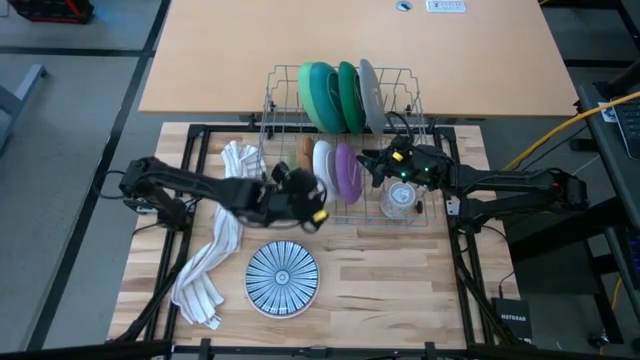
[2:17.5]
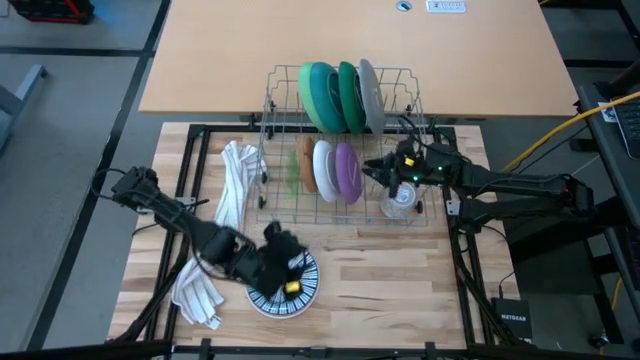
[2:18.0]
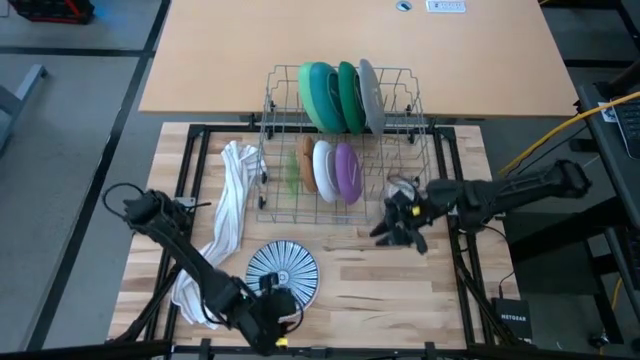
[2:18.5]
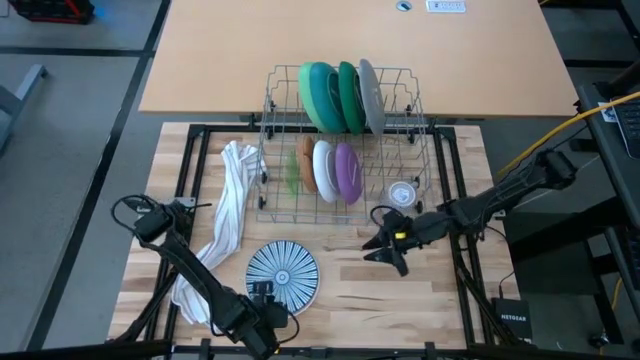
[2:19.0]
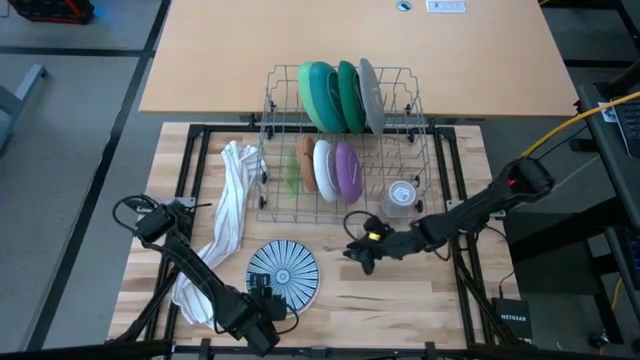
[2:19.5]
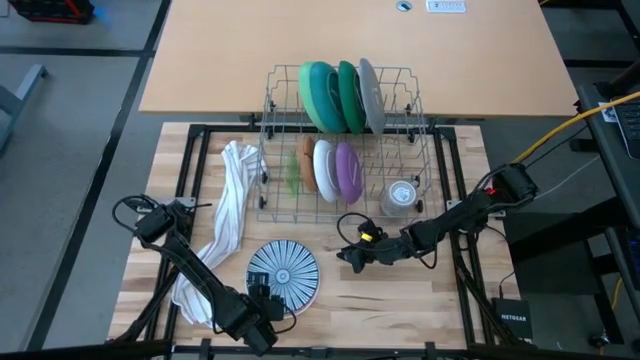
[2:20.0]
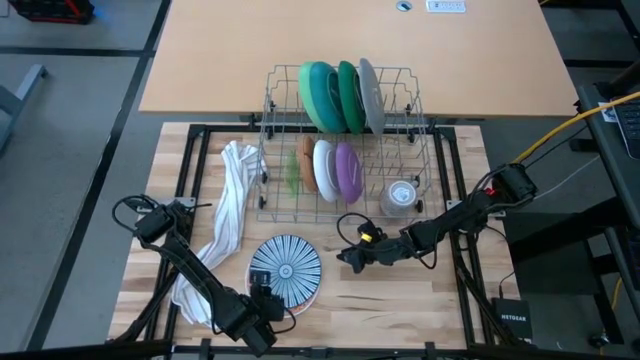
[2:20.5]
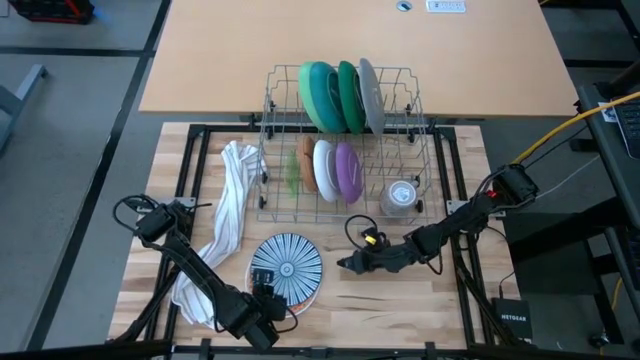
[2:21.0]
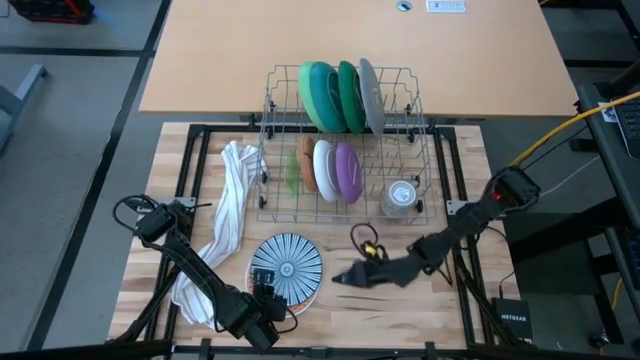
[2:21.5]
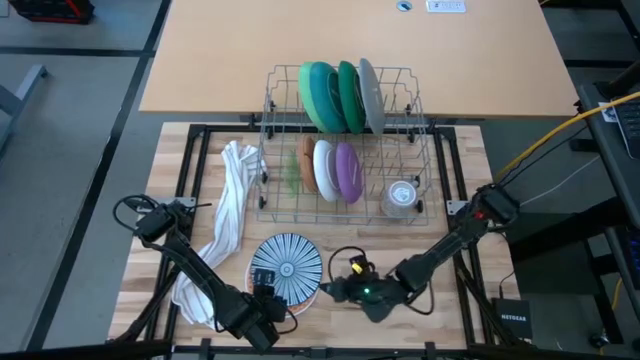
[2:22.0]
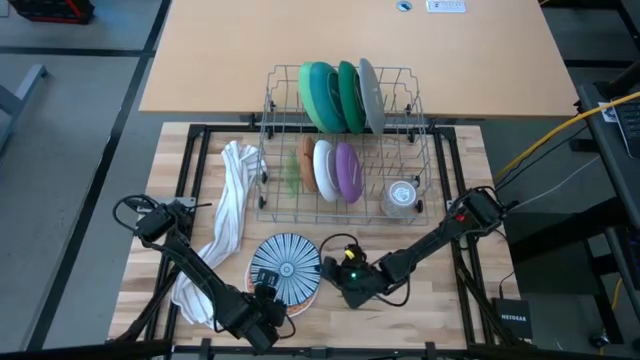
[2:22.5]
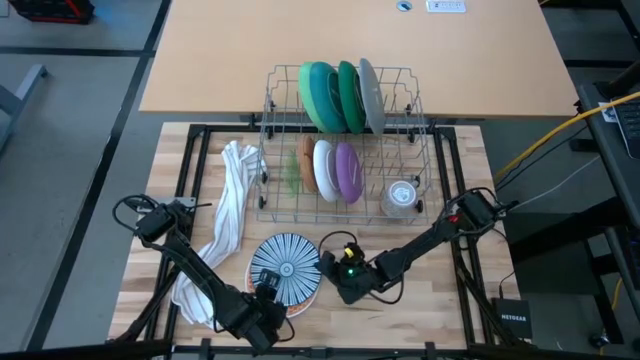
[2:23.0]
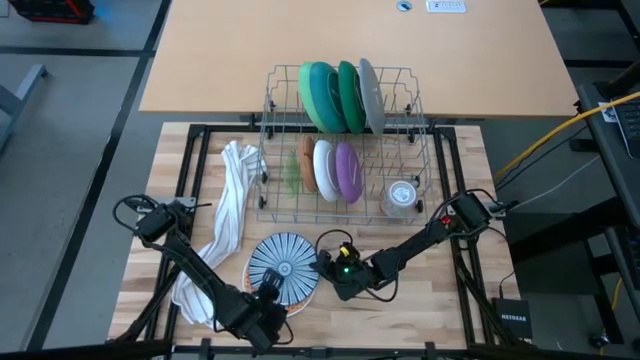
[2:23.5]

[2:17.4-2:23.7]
Task: Sort dishes
Put the blue patterned plate into the dish rack

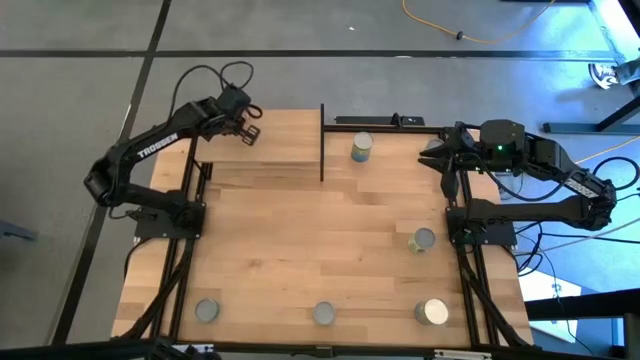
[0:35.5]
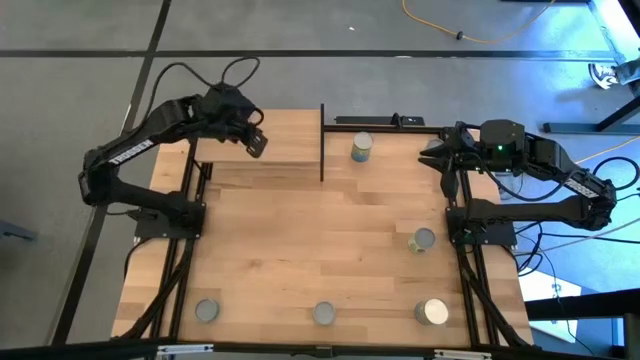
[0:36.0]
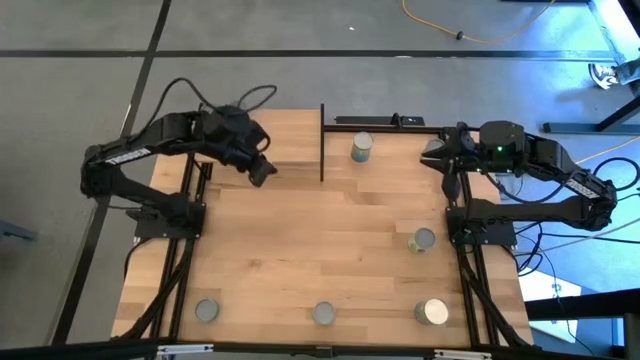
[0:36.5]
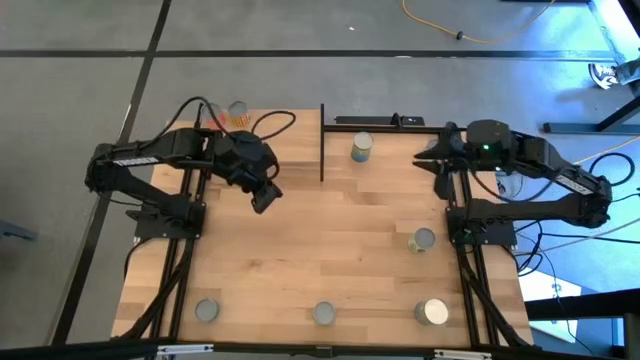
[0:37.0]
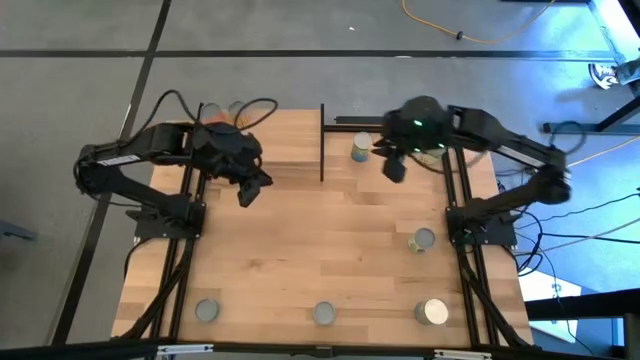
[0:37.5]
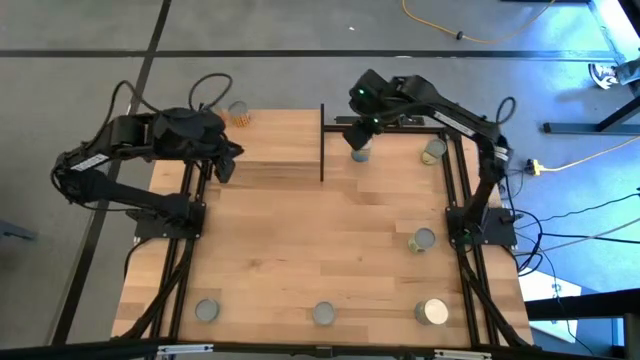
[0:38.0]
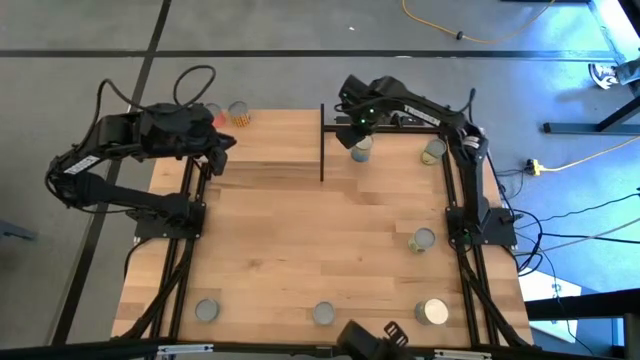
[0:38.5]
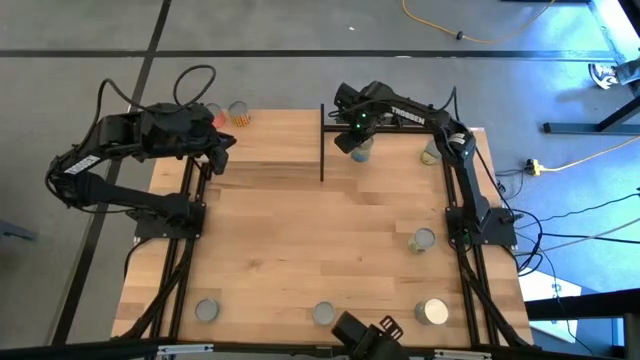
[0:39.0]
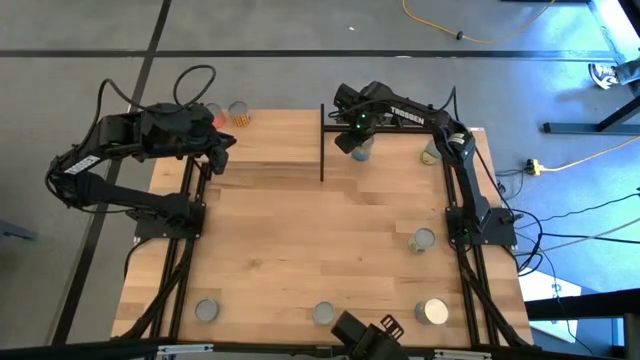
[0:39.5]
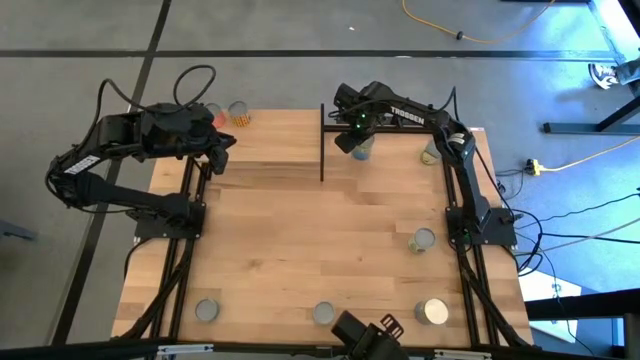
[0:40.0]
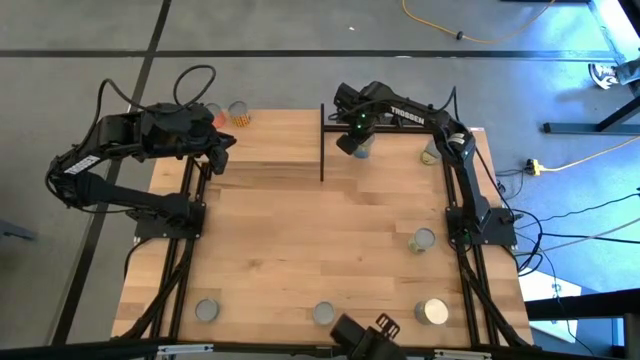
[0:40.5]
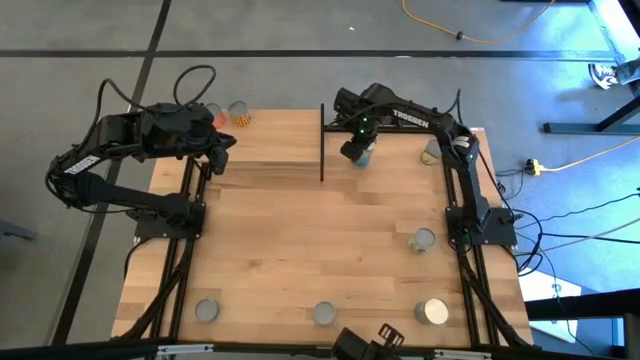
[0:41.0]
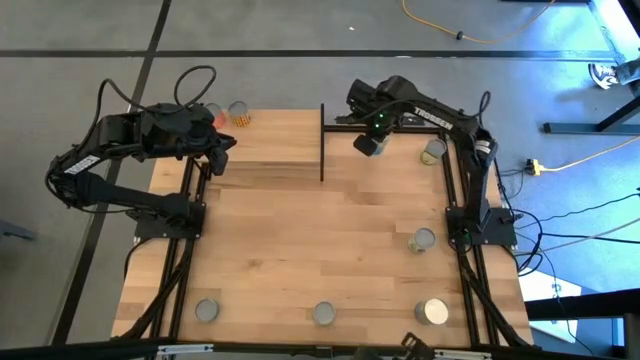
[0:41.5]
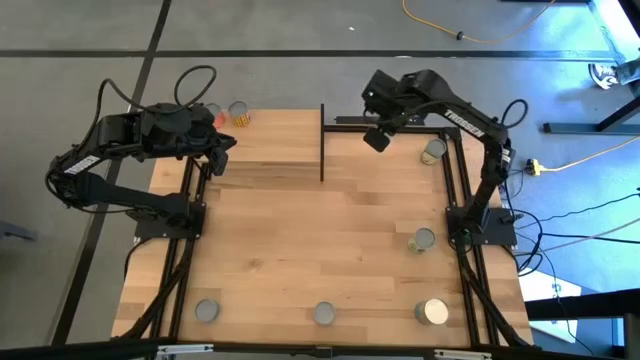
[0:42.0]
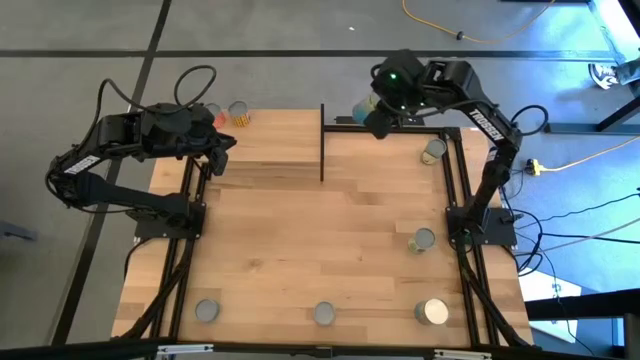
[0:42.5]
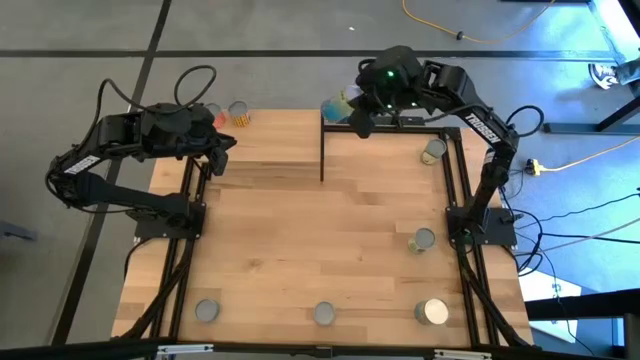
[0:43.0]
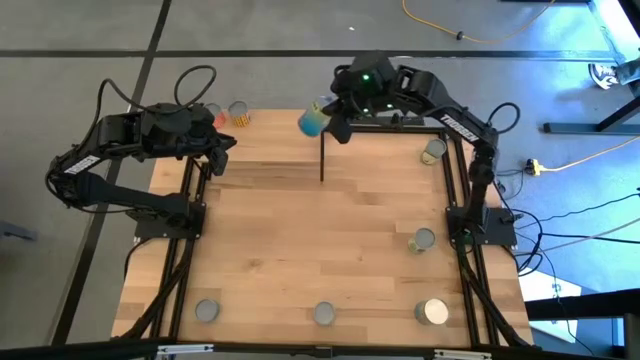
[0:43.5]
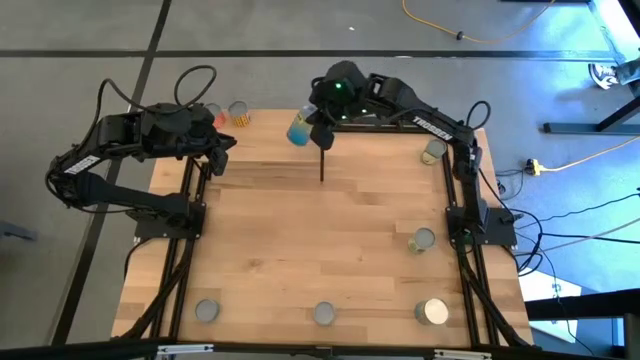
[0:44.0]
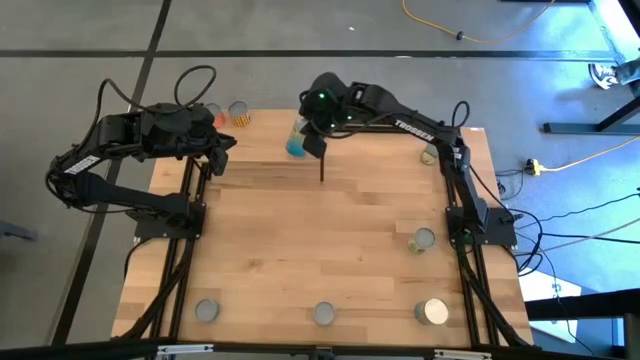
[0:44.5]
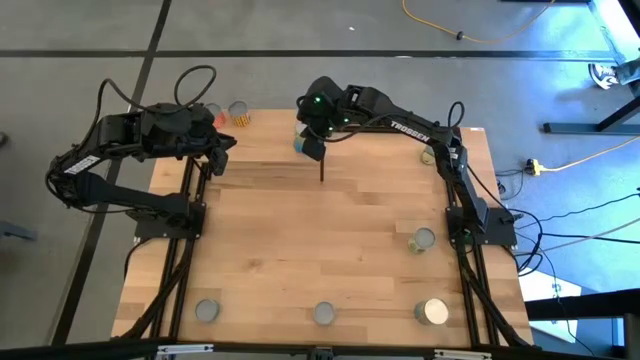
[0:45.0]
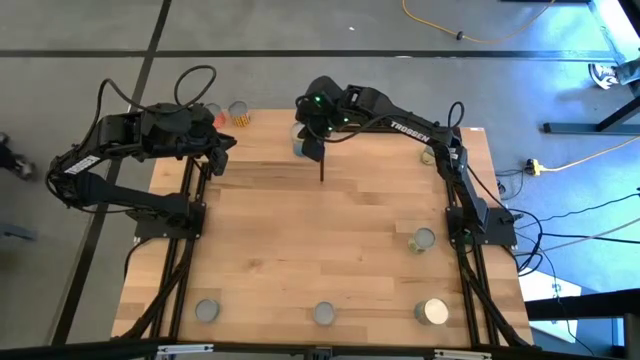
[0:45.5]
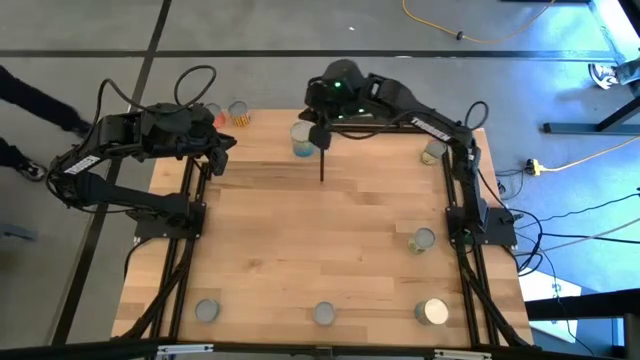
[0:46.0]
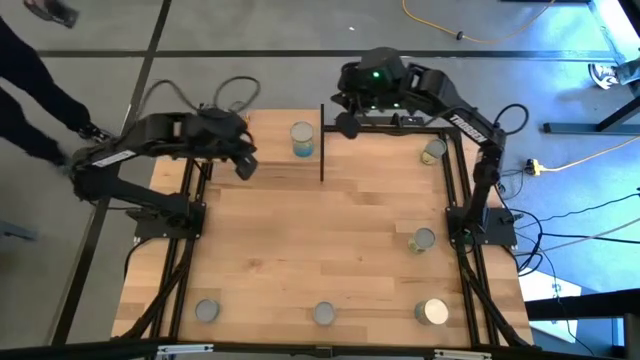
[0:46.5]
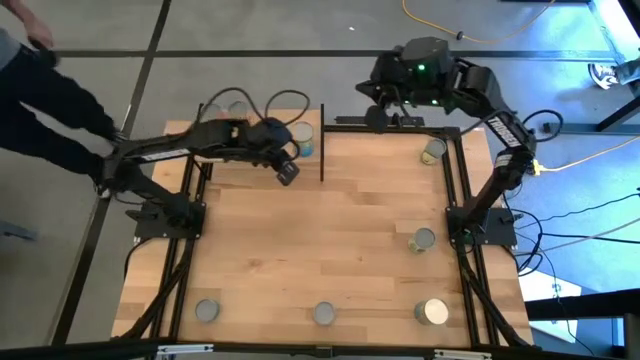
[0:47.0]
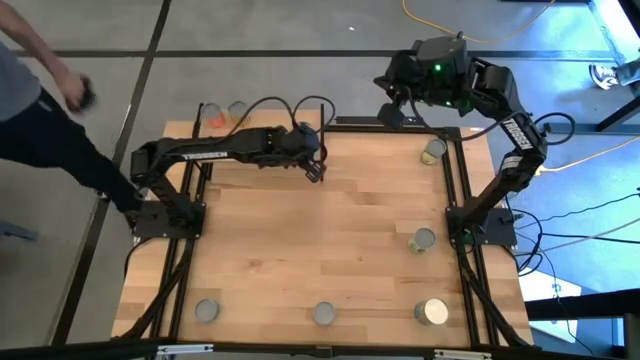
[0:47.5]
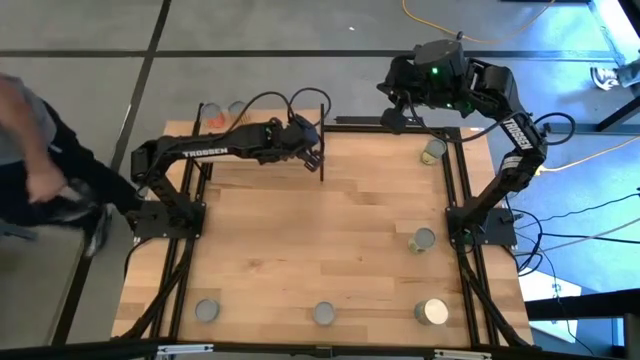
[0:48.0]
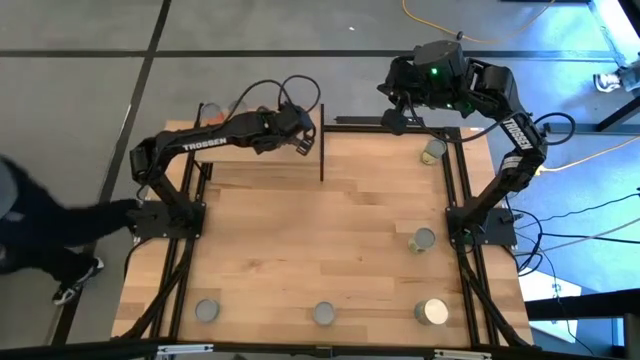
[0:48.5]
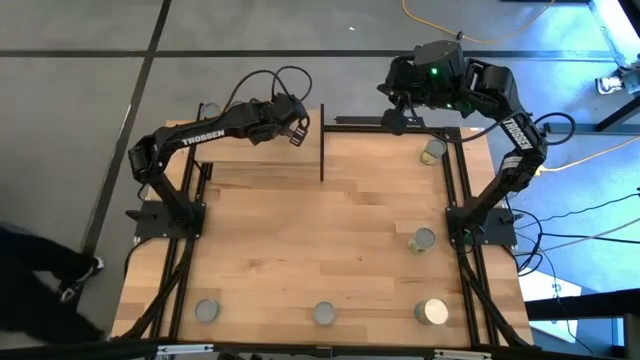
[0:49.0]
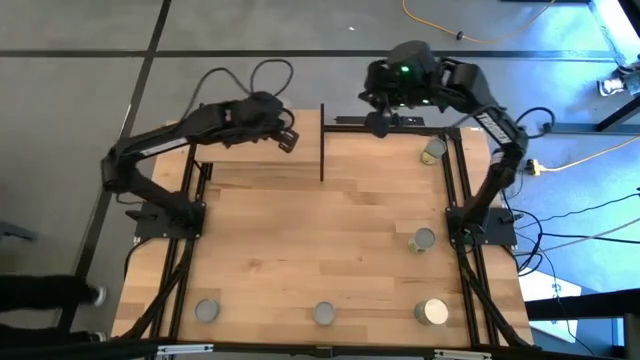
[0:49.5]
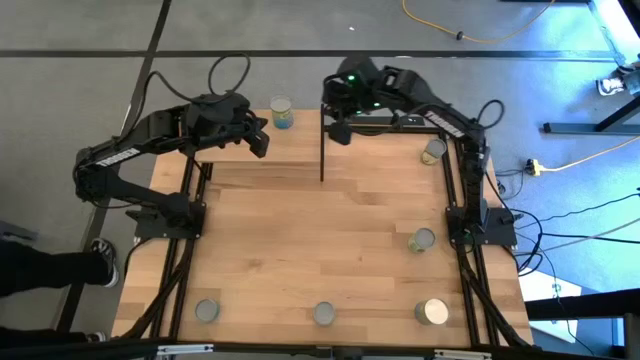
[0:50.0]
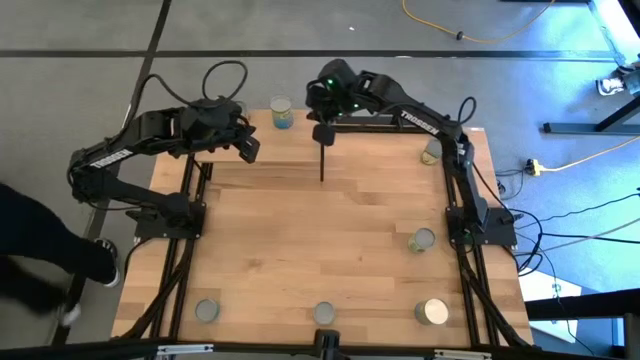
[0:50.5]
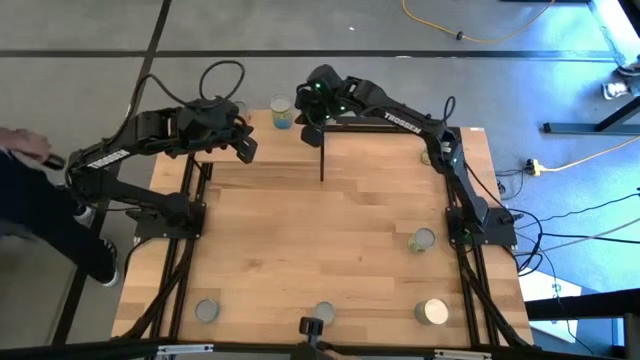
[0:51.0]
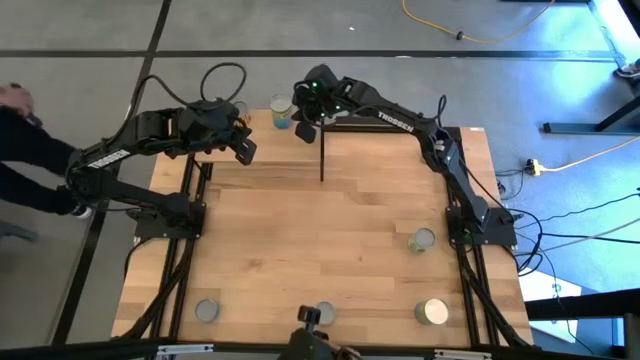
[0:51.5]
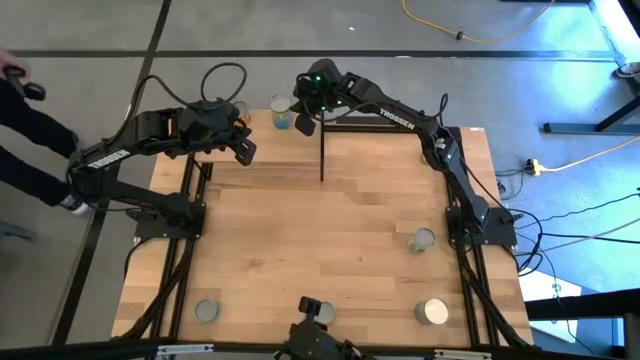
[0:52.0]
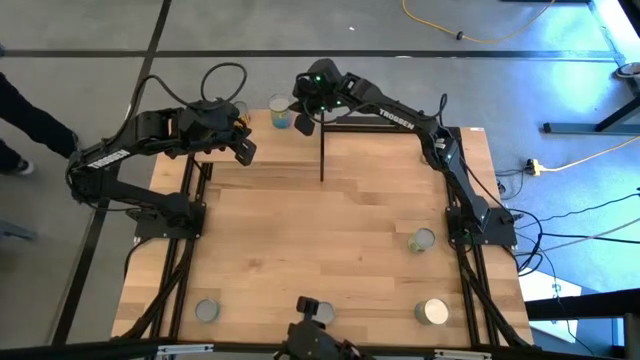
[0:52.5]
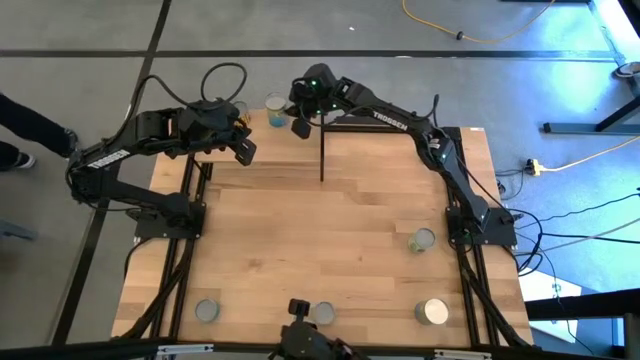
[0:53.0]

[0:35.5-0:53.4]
Task: Pick and place cans onto a shelf
Put the top canned cherries on the shelf
